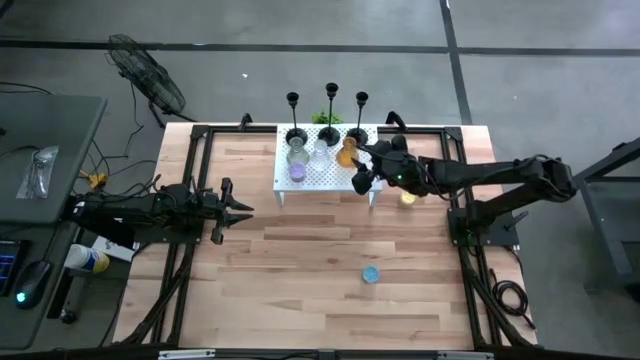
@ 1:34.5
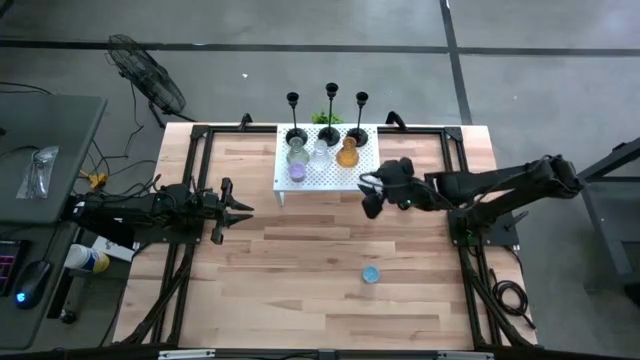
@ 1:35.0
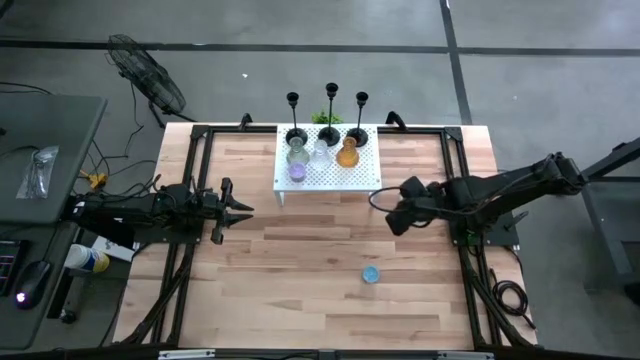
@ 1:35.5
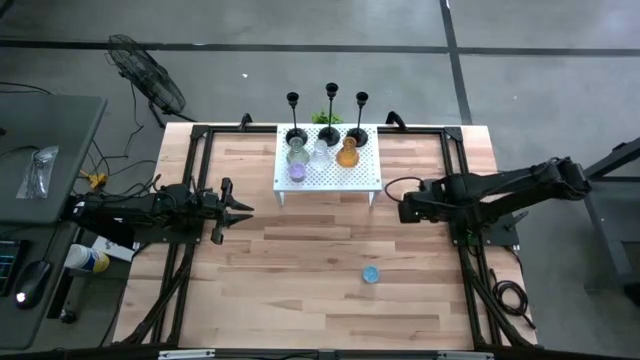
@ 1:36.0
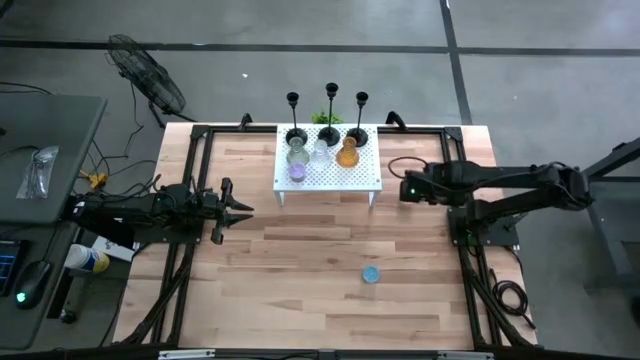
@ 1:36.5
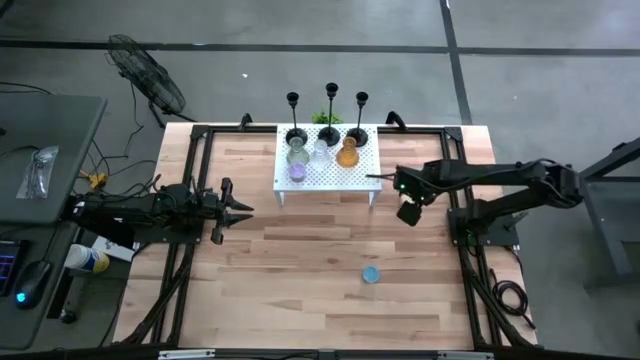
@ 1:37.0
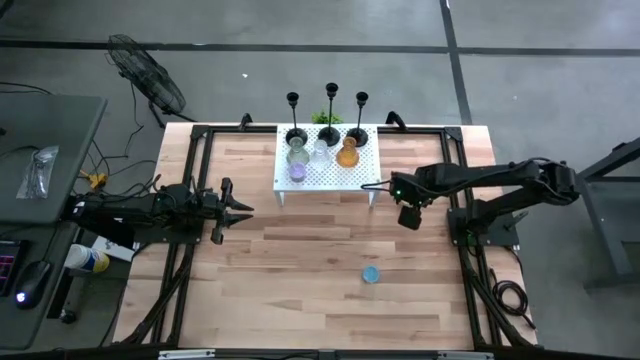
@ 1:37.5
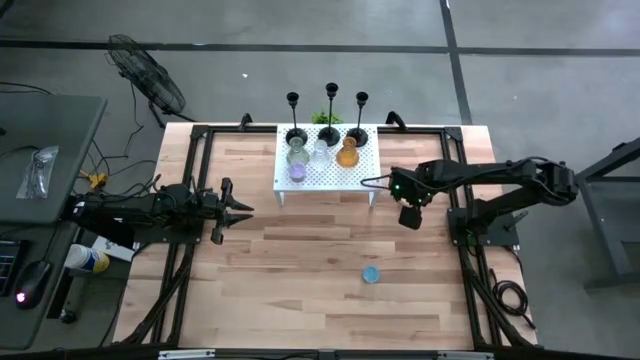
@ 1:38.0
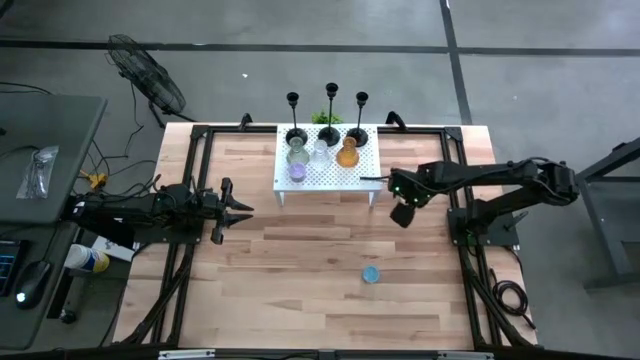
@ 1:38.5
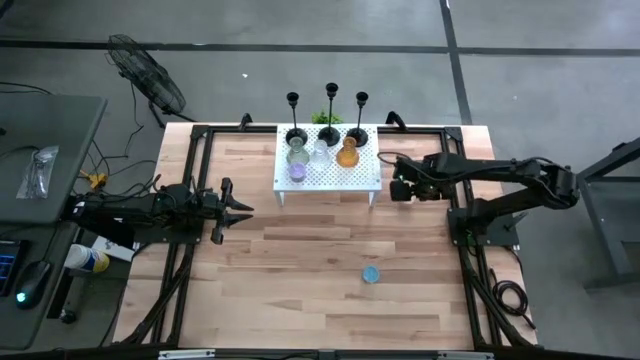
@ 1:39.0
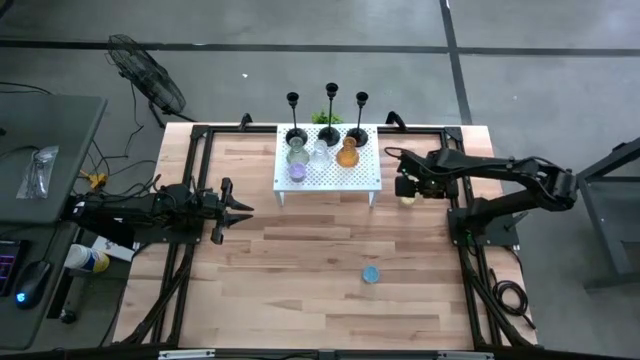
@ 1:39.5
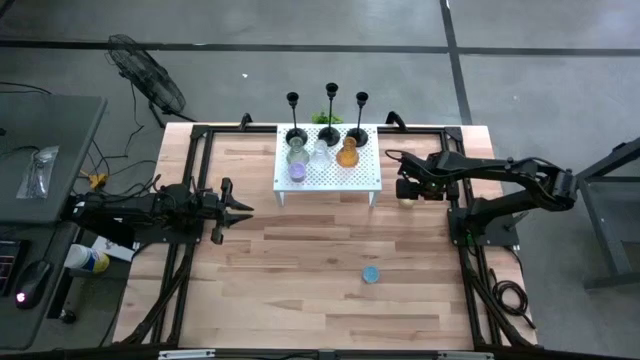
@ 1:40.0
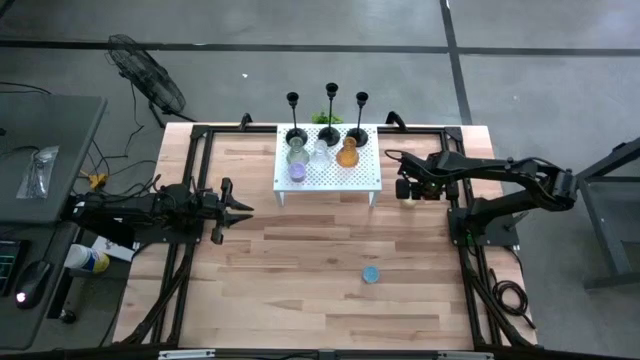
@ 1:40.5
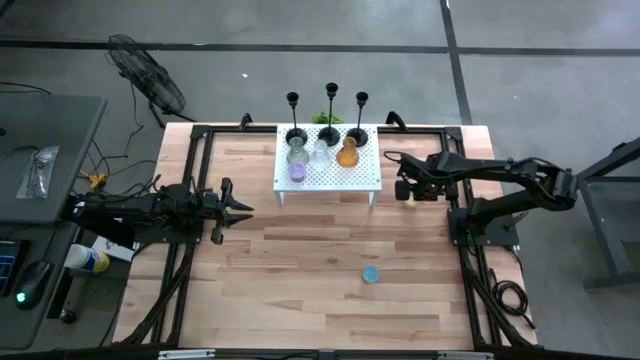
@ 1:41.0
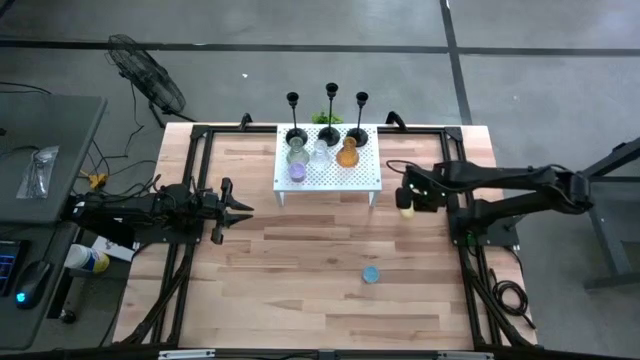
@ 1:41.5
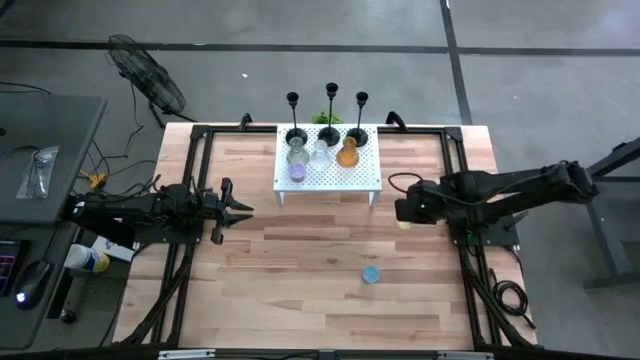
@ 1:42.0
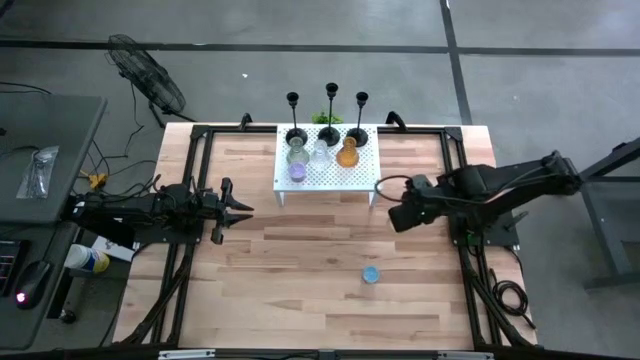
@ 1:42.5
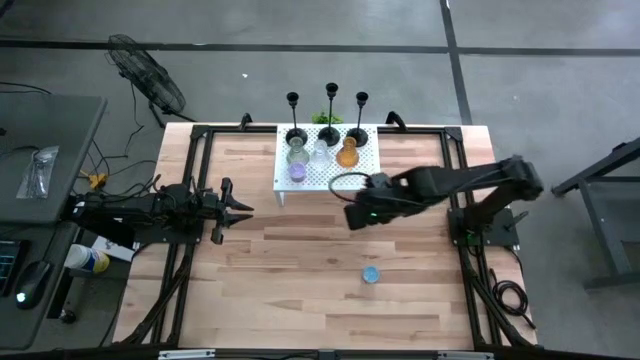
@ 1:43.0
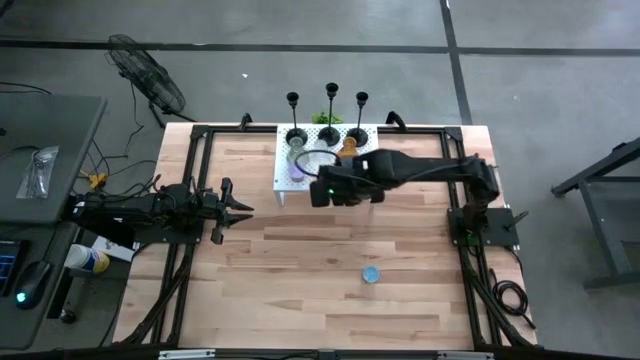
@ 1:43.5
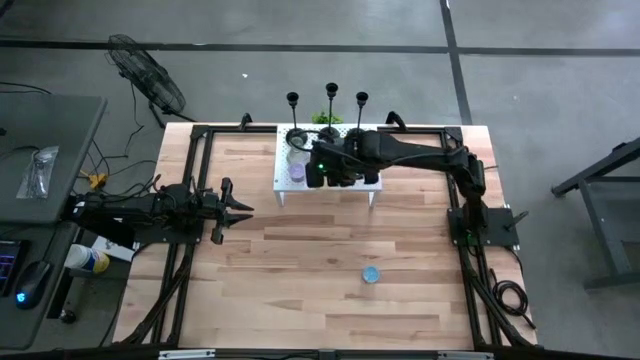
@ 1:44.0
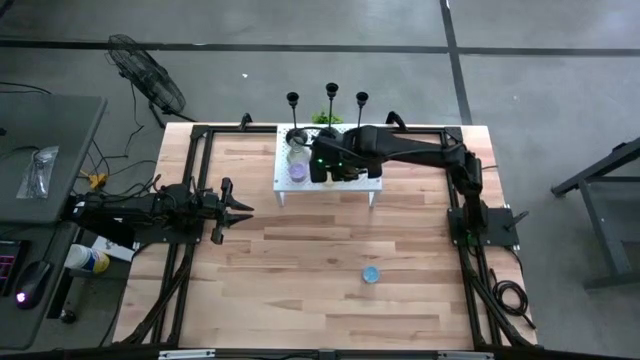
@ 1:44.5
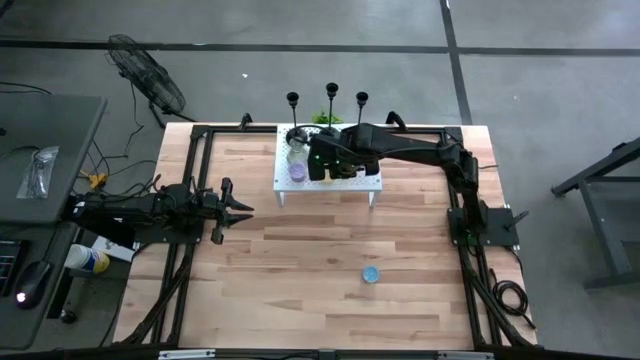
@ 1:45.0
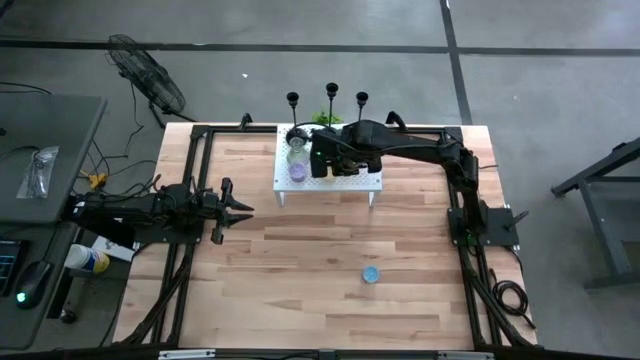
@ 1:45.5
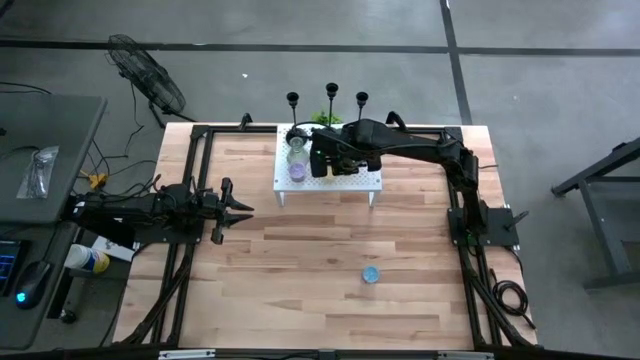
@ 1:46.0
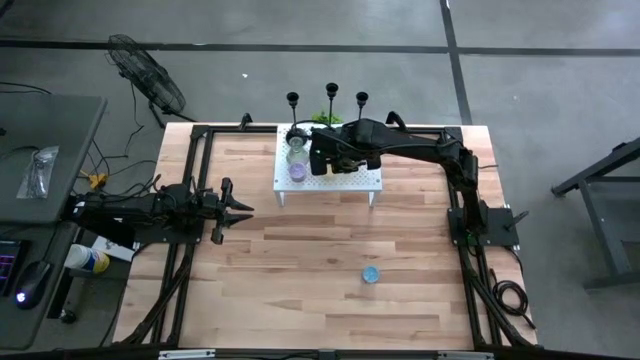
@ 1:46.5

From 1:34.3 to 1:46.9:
Task: Pick & Place candle stick holders
Put the yellow scented candle on the shelf aligned with the purple scented candle

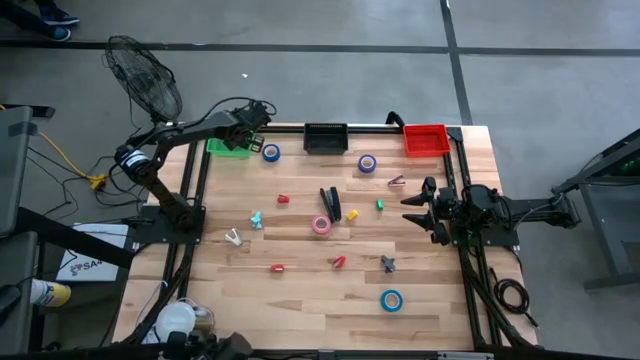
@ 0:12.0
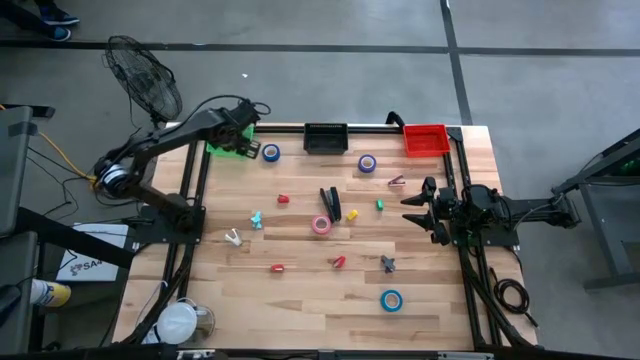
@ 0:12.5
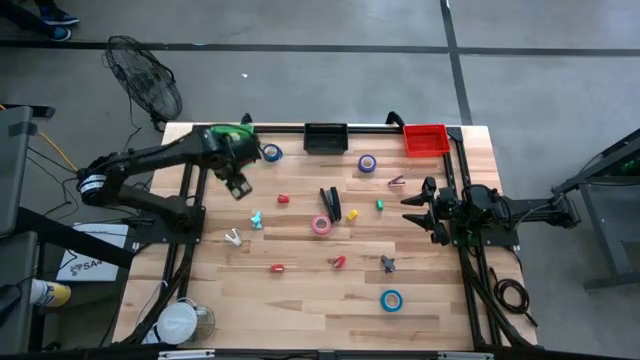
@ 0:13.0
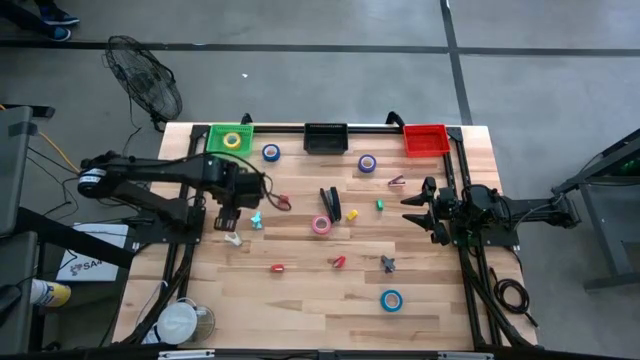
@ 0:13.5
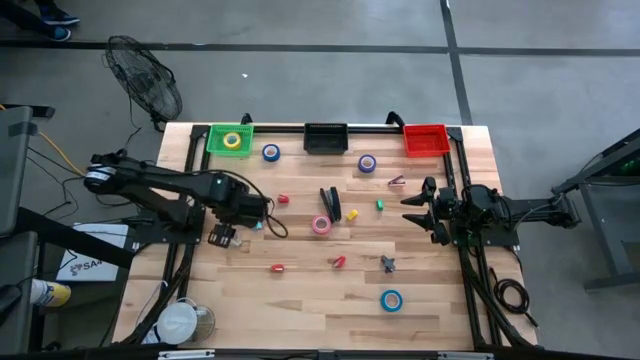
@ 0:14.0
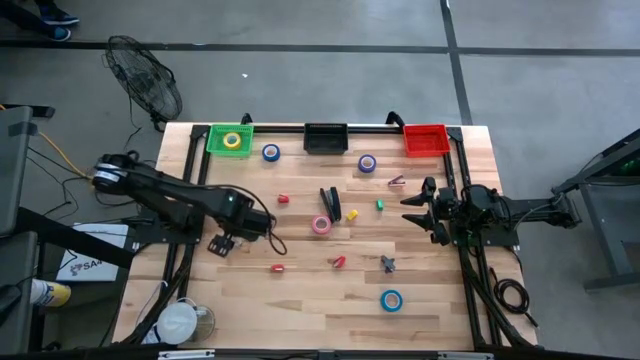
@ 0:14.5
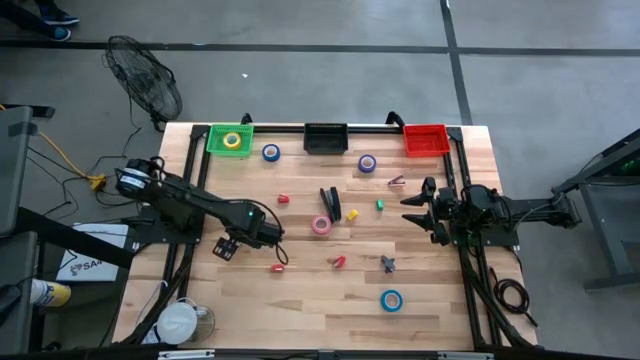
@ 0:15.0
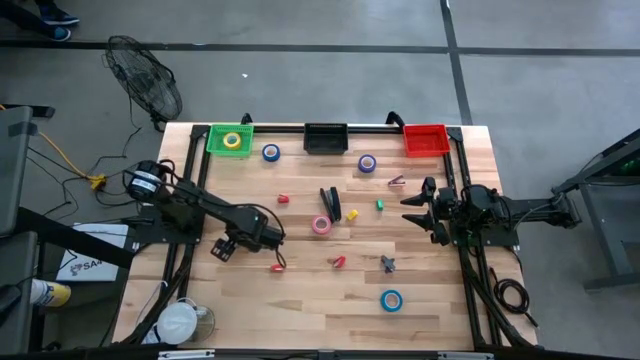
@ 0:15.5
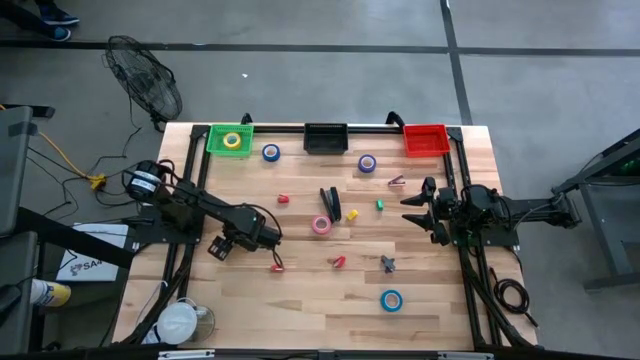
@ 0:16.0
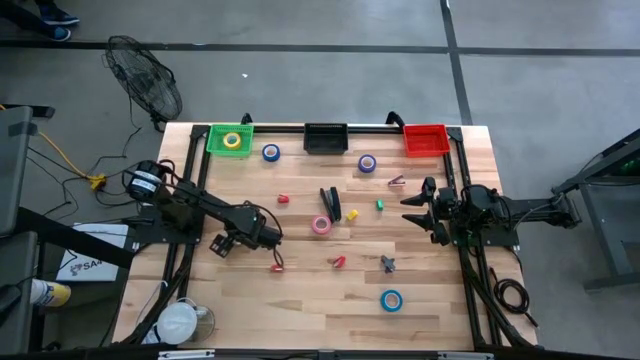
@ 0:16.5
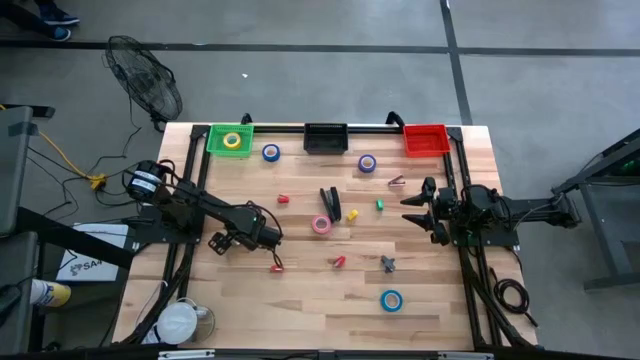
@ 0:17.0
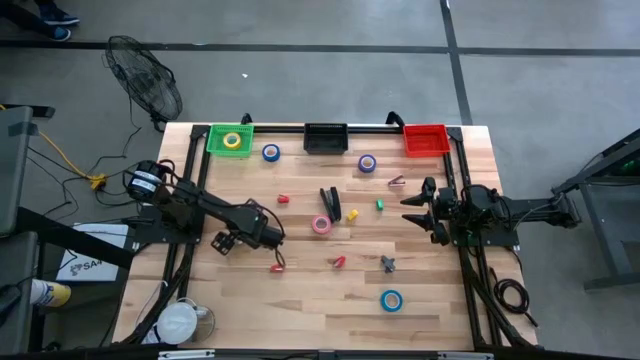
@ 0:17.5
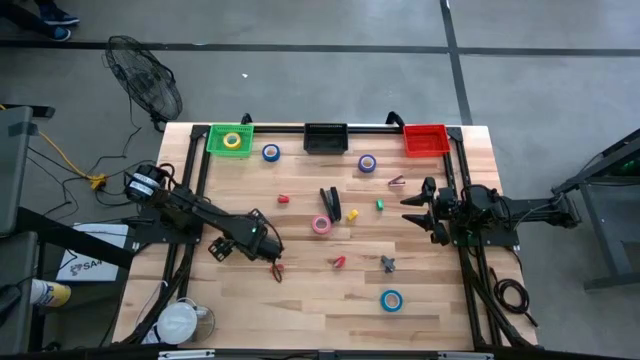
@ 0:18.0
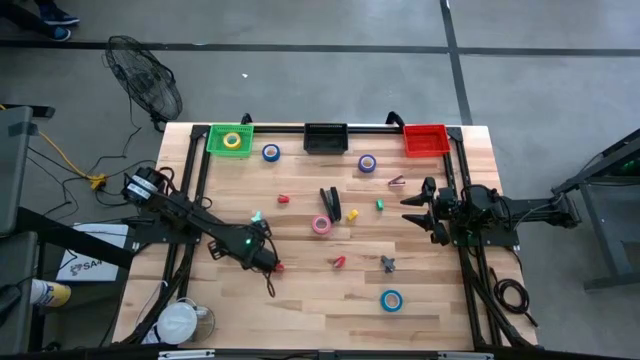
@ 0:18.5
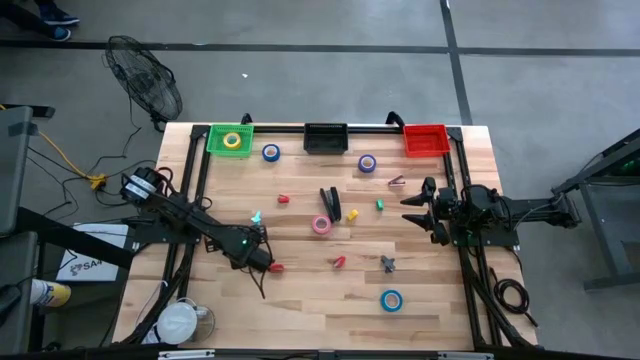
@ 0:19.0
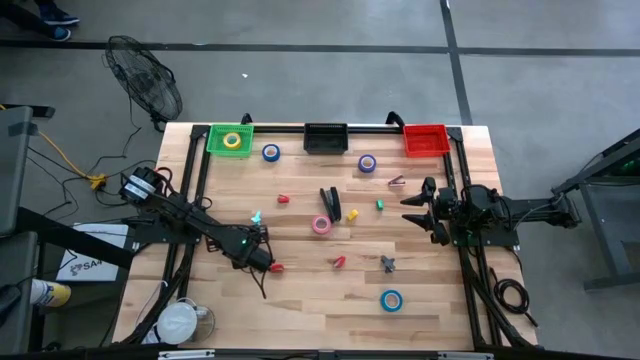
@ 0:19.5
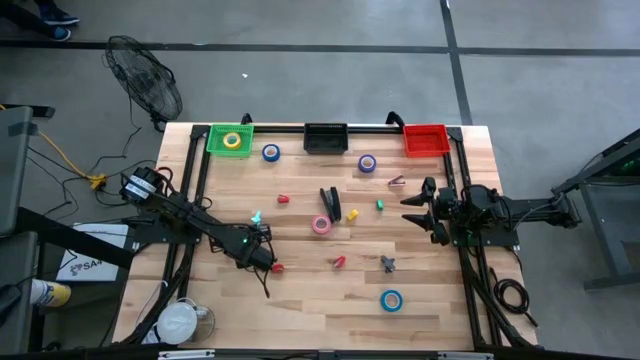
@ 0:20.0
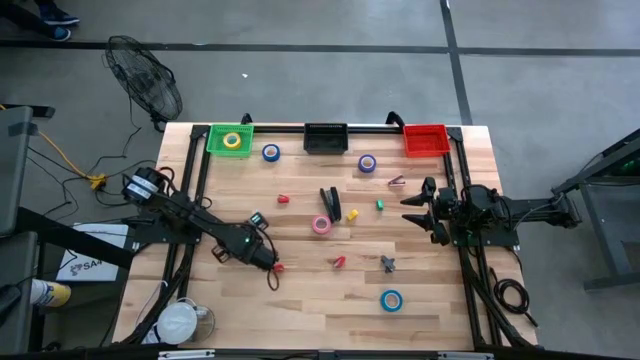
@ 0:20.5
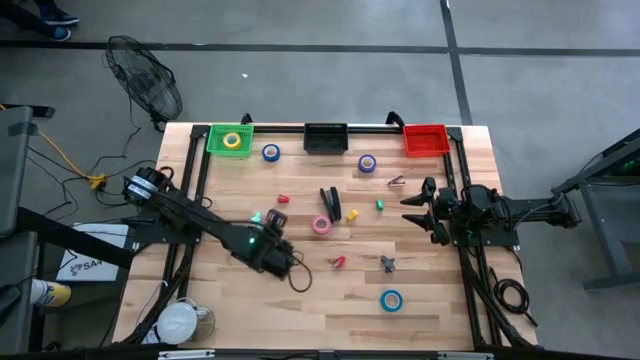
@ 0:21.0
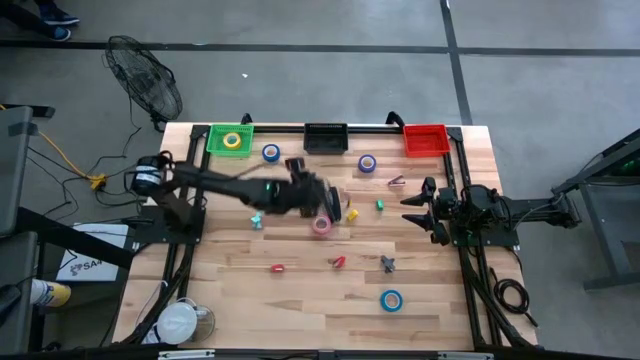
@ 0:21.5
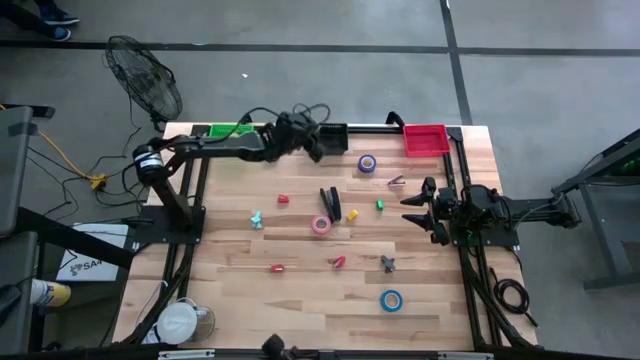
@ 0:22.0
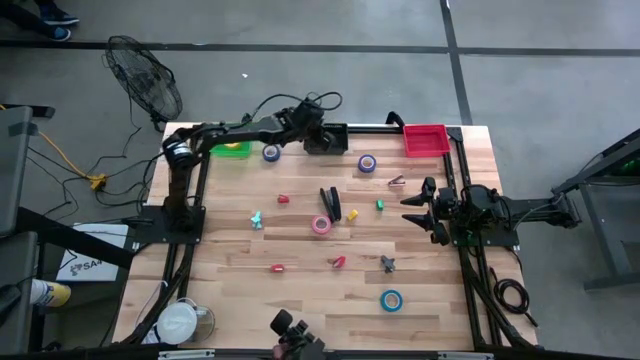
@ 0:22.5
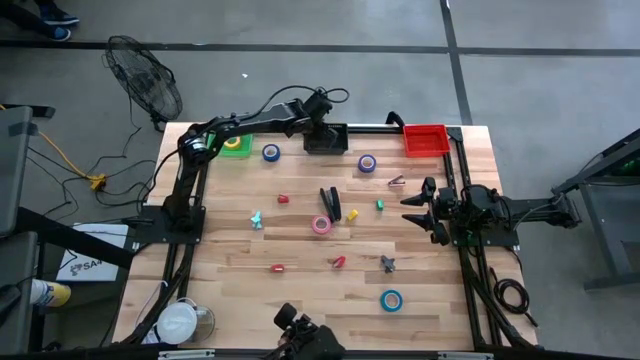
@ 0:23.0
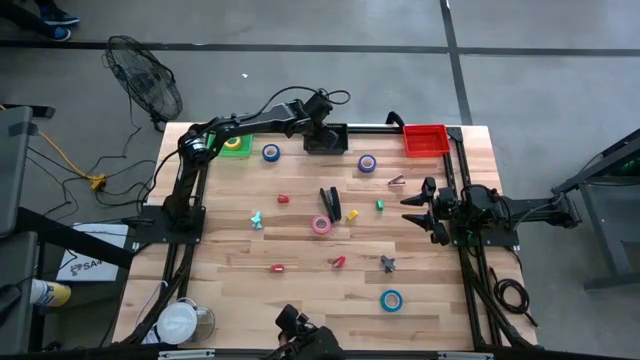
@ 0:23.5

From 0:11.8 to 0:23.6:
Task: Pick and place Stapler, Stapler remover, tape
Put the gray staple remover in the black bin
